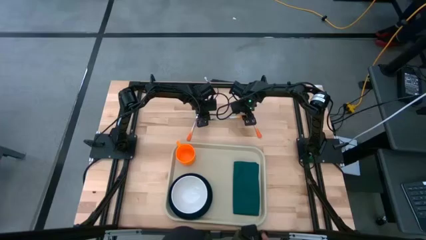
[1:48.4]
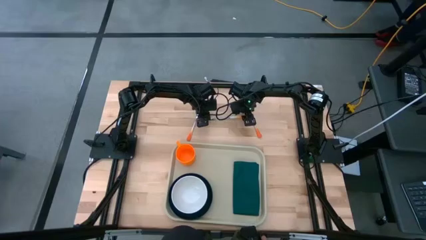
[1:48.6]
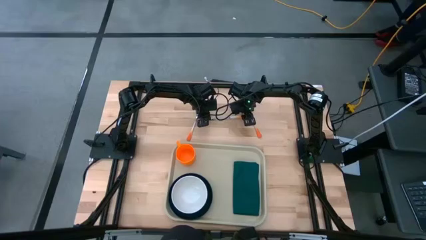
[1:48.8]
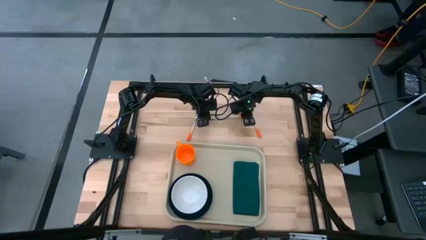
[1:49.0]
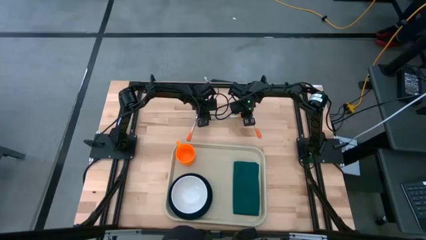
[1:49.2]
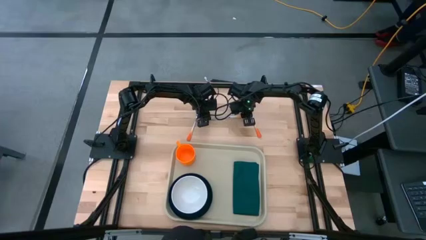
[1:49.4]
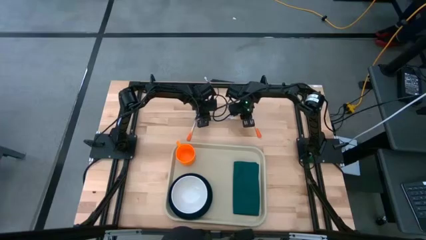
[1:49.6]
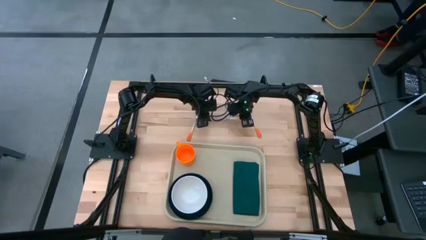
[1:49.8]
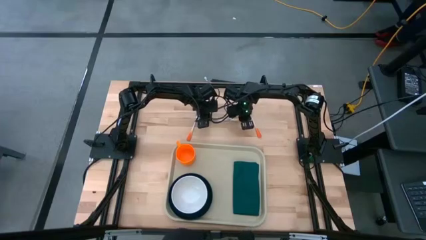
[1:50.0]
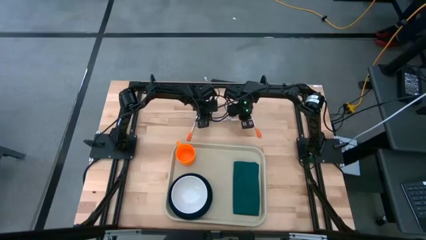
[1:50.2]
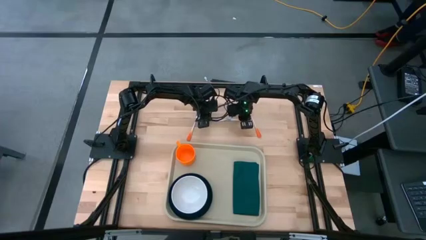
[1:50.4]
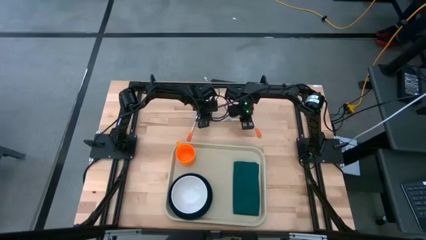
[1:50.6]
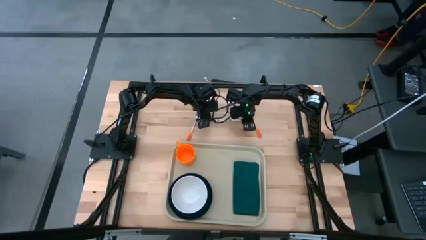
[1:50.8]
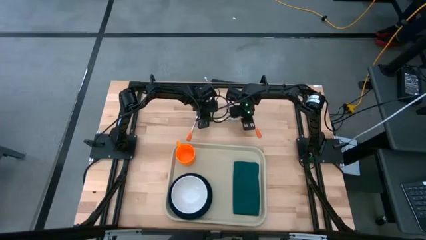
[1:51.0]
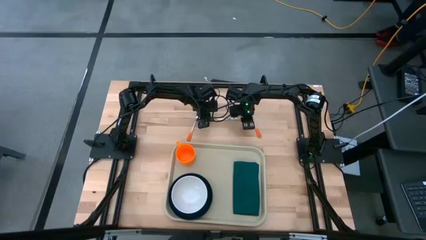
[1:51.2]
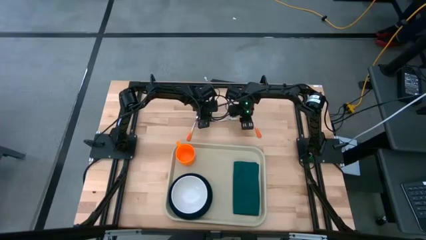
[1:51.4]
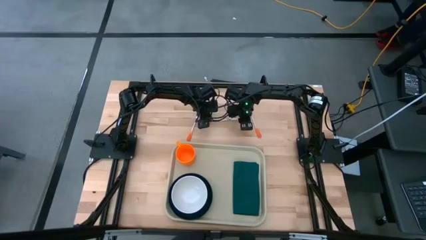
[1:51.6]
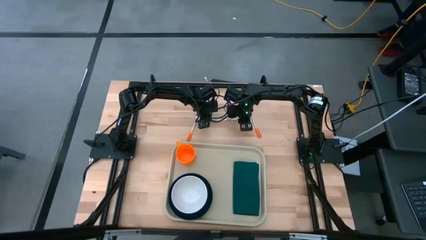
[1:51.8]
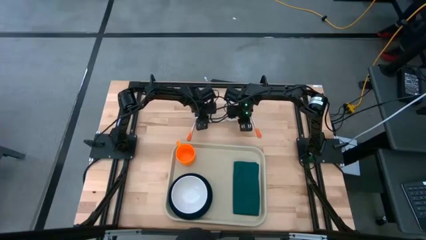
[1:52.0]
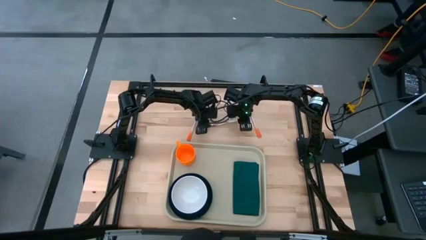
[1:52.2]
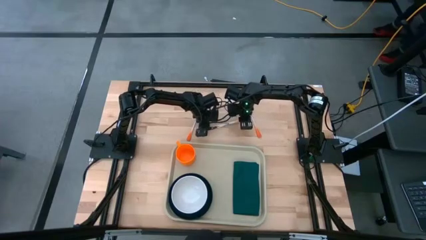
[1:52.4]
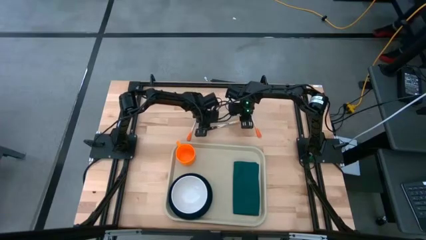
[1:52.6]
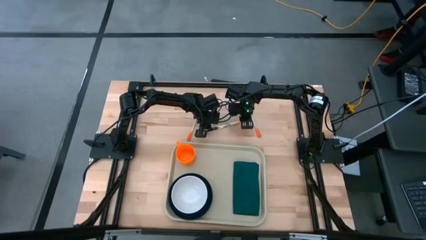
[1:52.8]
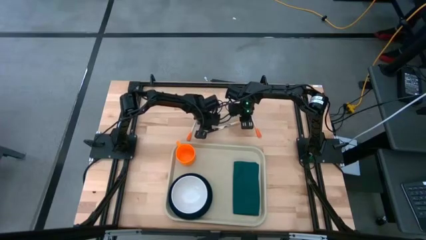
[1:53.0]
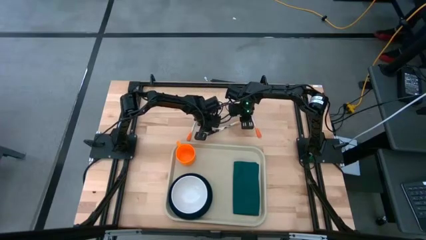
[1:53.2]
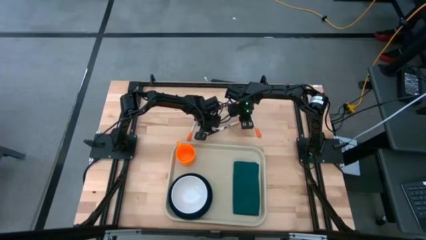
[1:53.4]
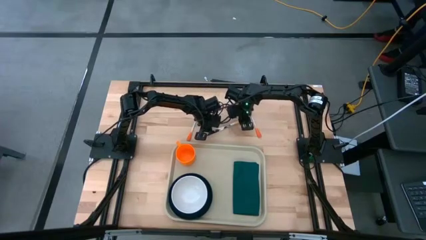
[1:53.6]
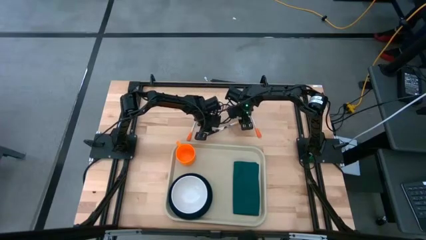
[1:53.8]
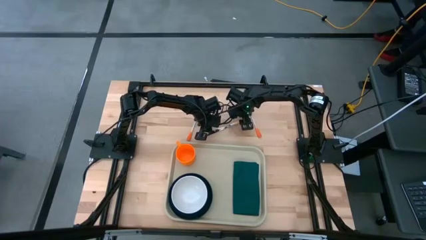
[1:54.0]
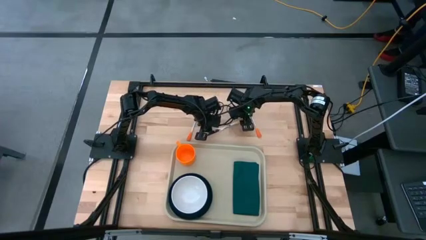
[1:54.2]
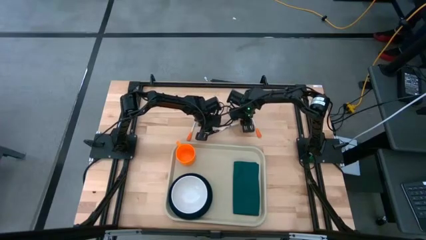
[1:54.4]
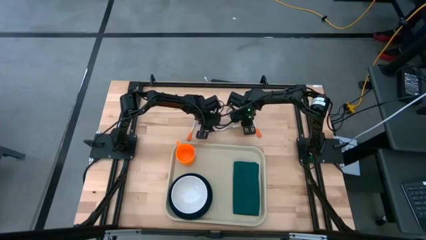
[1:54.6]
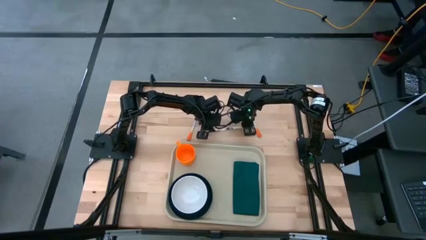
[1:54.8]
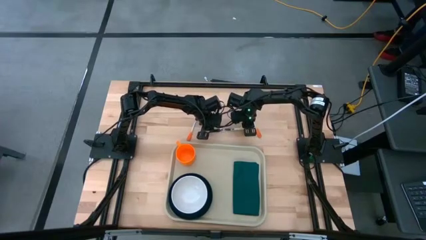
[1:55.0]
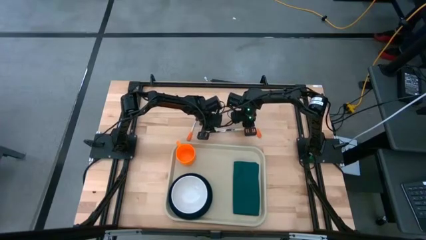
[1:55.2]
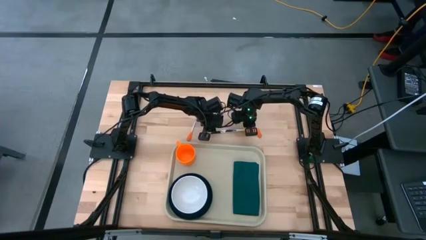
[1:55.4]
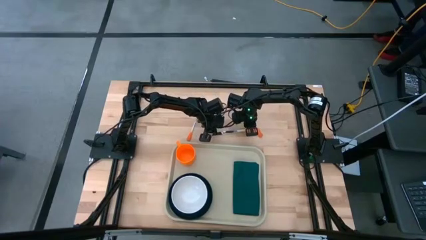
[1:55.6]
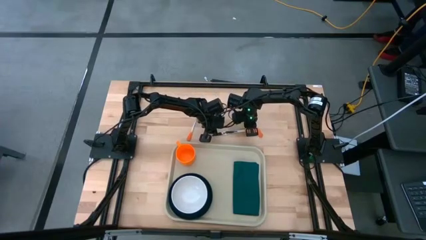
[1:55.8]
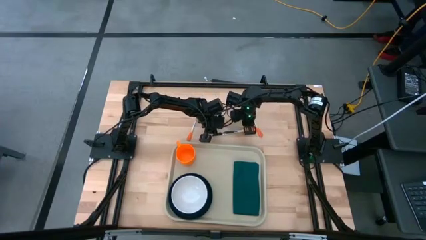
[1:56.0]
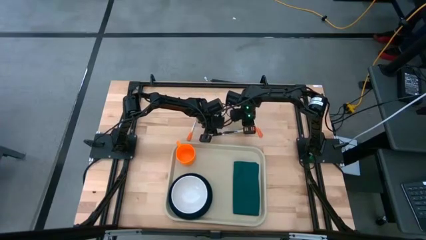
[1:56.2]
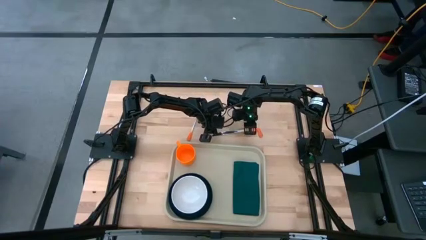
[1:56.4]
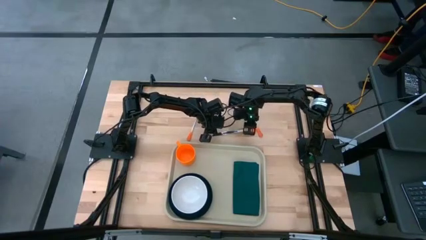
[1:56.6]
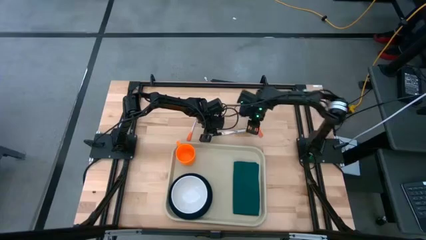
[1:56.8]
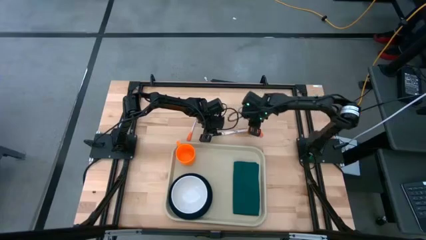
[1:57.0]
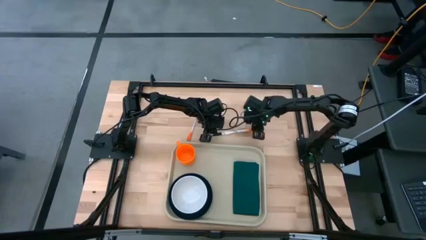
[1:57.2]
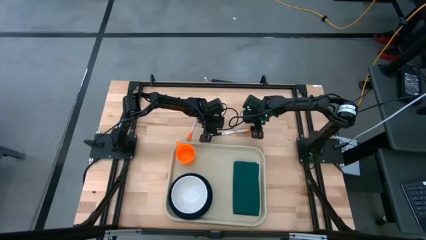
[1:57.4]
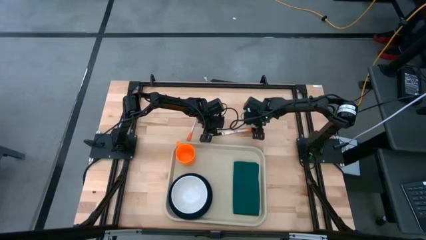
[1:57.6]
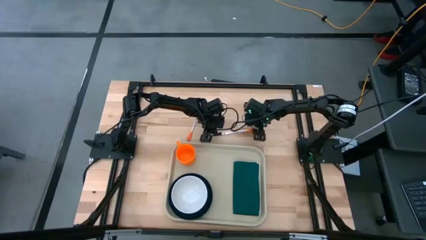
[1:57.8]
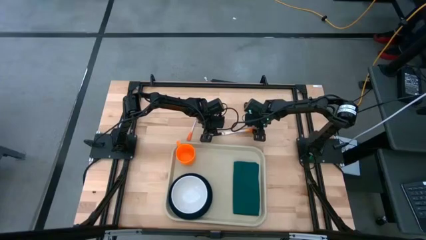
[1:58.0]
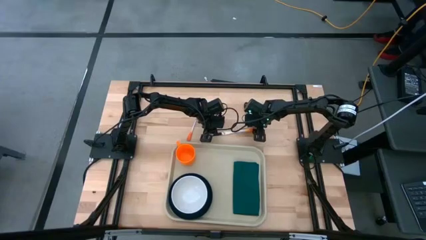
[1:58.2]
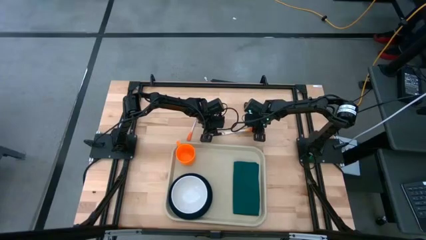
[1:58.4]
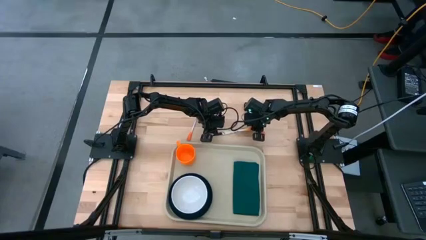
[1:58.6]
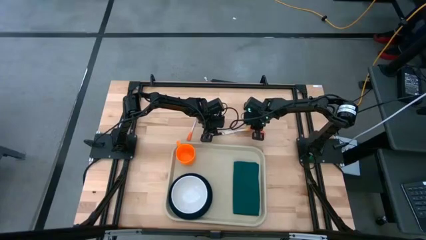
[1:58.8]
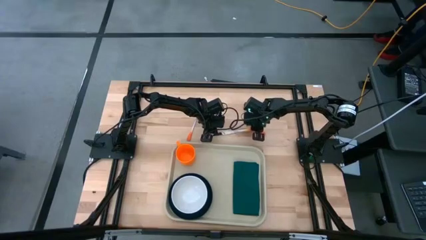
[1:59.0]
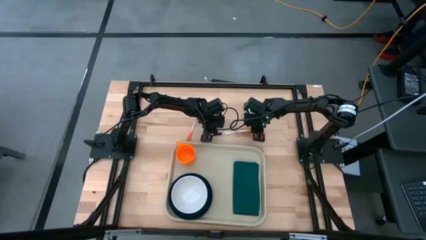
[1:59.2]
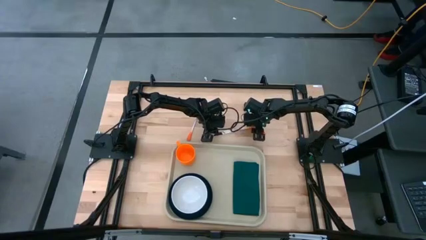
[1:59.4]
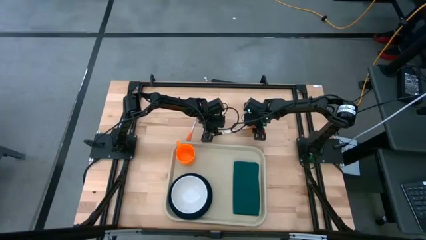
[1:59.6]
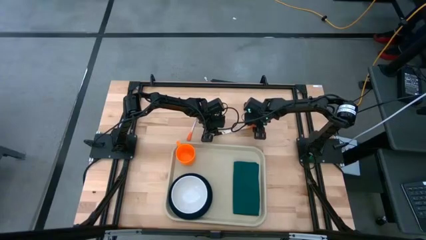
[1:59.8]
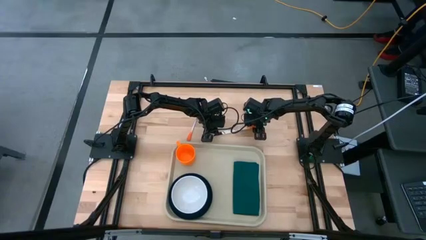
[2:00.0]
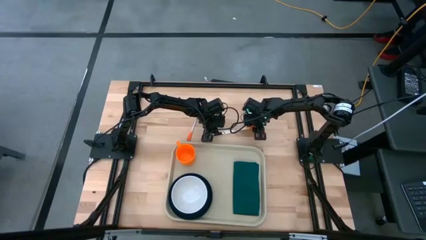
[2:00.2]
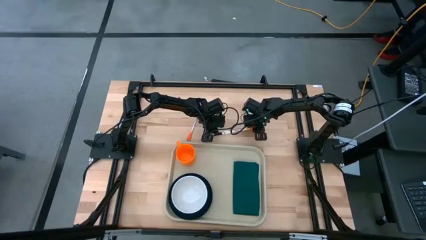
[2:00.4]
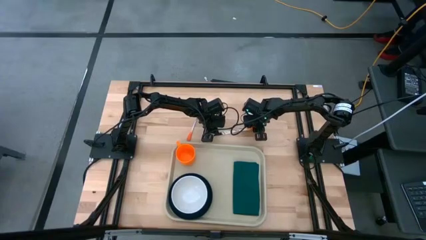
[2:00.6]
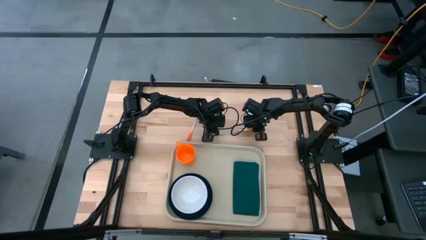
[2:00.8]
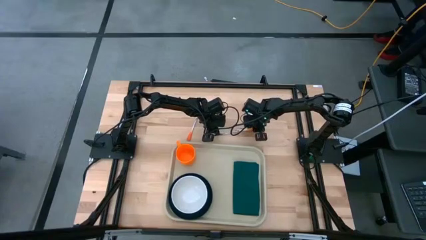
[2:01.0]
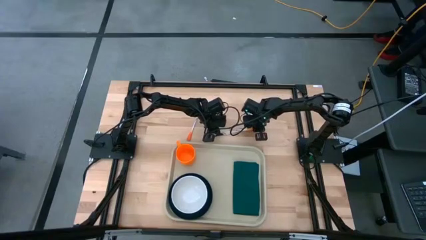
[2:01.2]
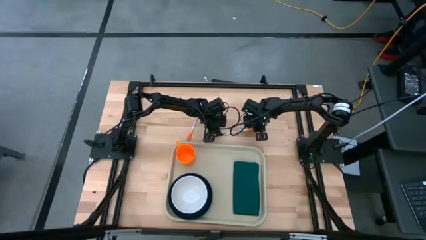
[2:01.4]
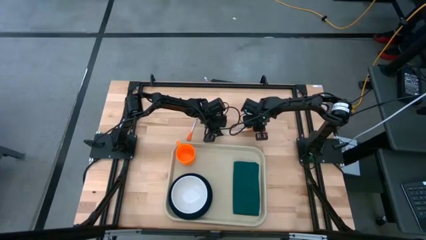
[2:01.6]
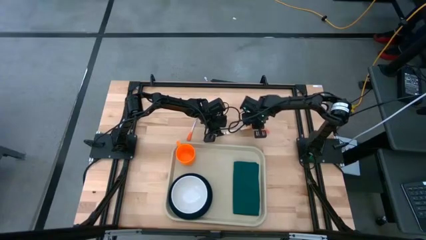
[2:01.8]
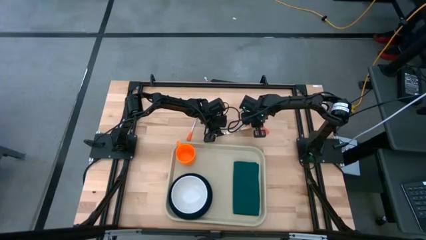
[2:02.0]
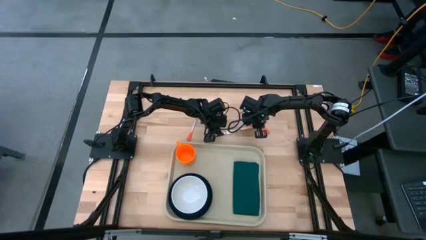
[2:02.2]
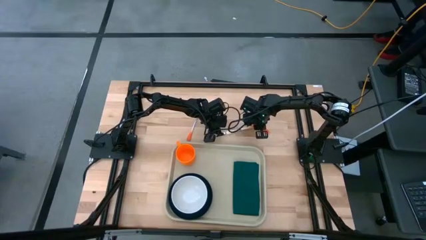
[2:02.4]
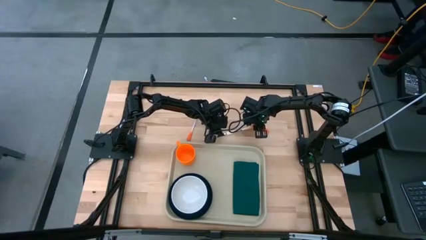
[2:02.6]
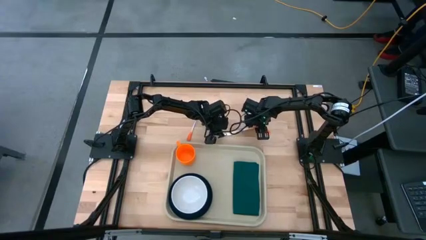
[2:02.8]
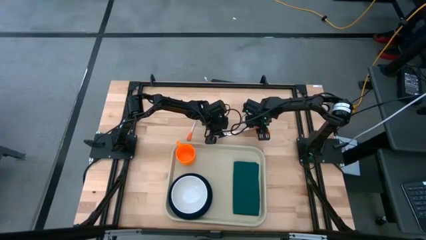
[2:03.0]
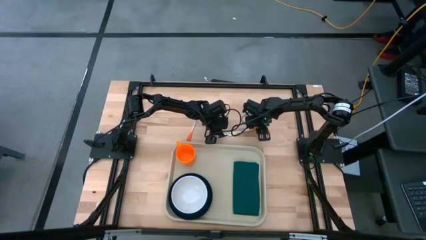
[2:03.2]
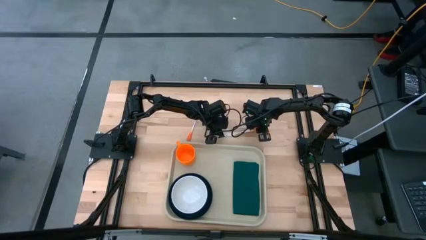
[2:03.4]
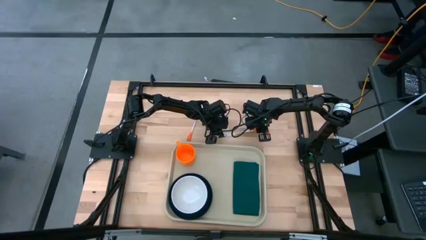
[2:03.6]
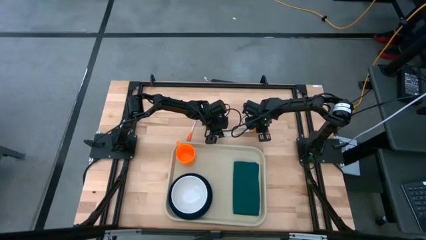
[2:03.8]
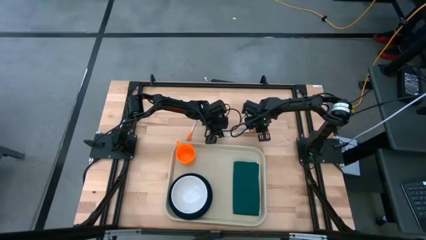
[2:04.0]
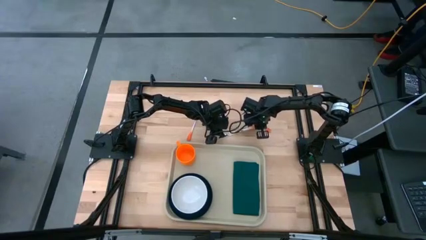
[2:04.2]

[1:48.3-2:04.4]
Task: Set up tray
Put the knife on the napkin
